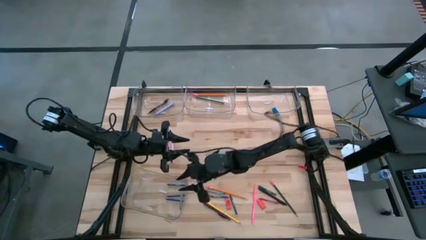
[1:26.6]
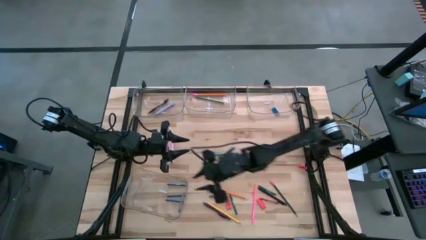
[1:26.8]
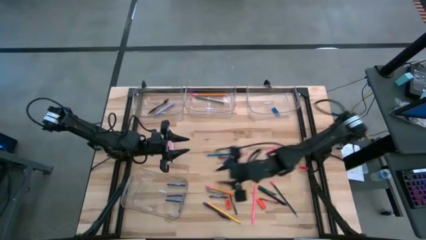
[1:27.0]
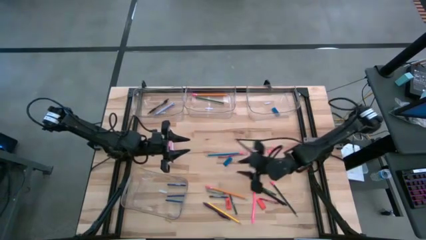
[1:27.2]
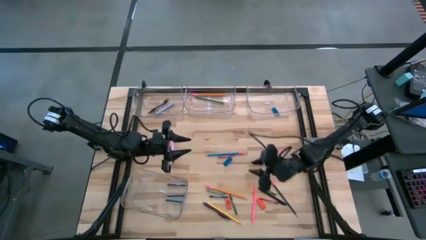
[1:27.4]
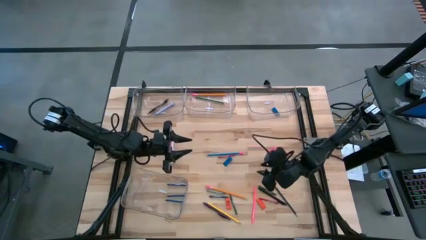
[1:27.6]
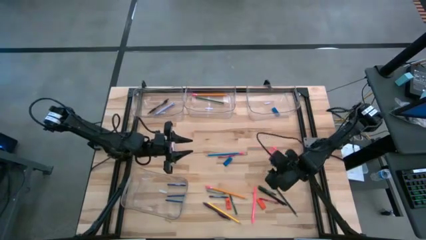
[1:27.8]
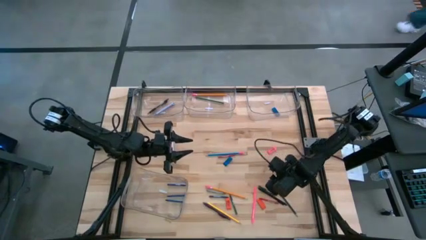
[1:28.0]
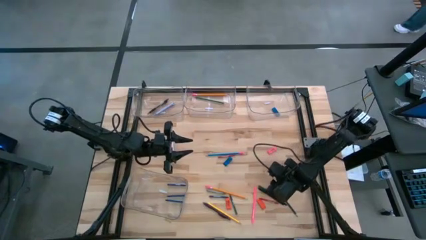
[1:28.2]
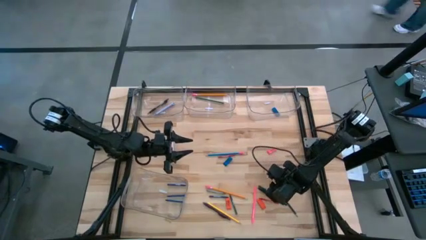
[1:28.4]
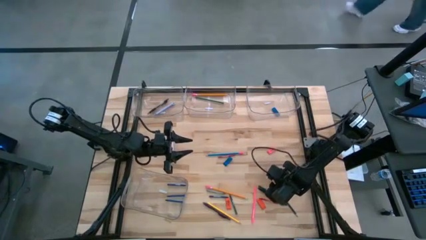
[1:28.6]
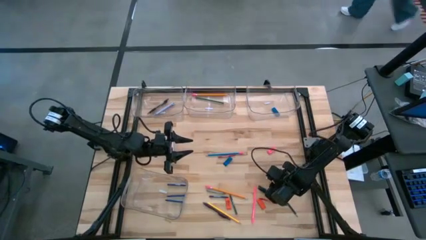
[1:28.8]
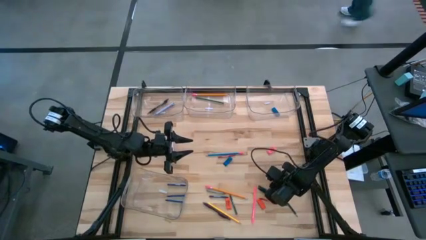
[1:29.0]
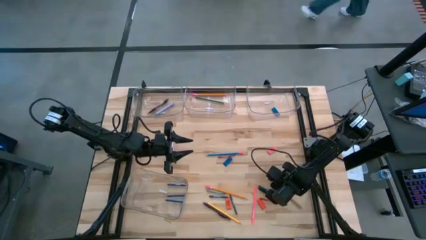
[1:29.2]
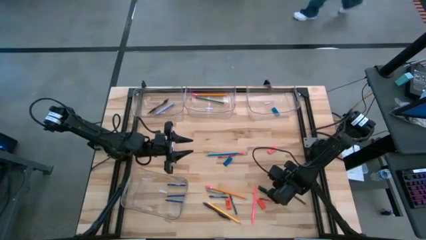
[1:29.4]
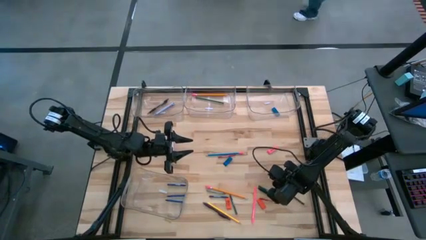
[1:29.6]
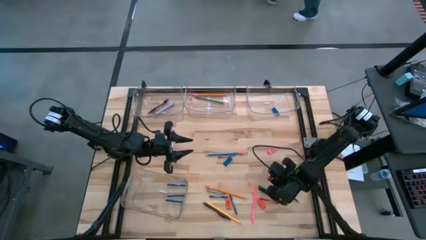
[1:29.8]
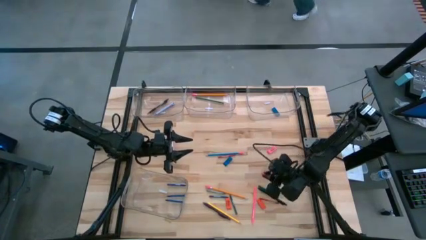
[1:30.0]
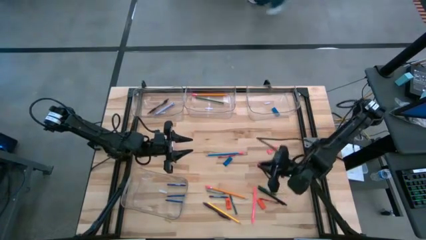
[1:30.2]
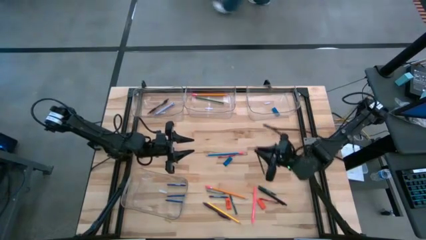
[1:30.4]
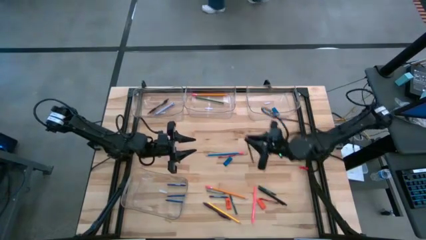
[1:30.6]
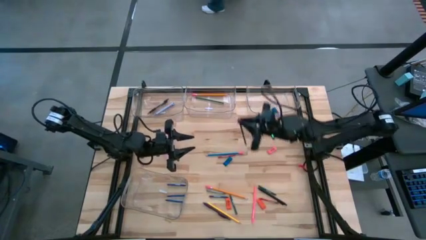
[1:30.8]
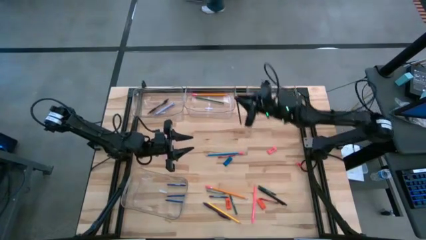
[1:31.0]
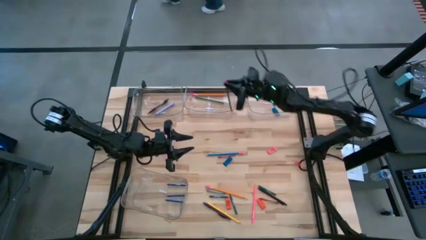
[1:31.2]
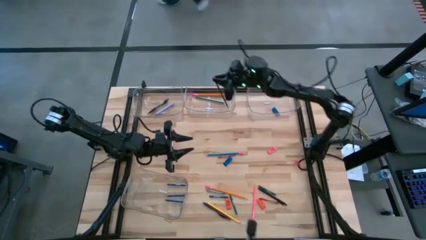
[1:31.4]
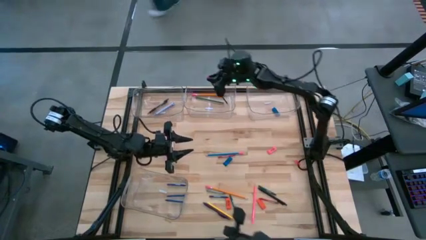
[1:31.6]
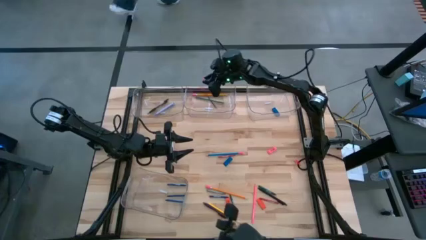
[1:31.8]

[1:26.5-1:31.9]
Task: Sort crayons/erasers/pens/pencils in bins
Put the dark green pencil into the top middle transparent bin

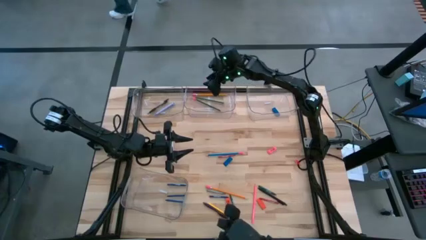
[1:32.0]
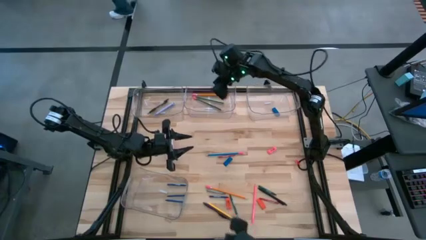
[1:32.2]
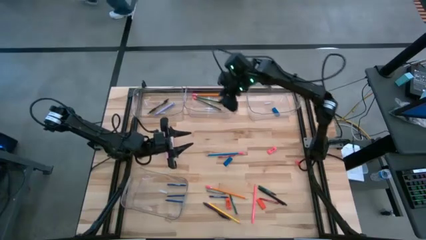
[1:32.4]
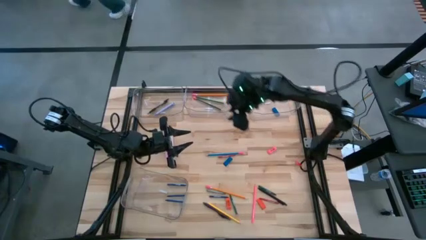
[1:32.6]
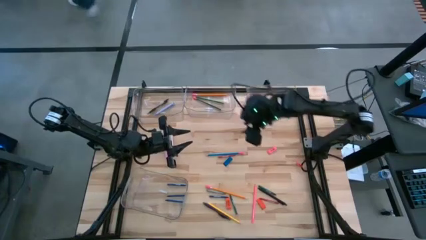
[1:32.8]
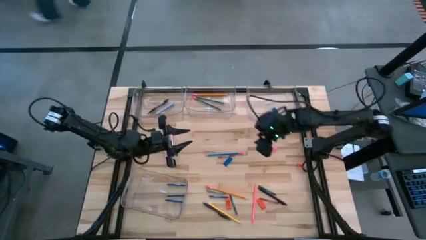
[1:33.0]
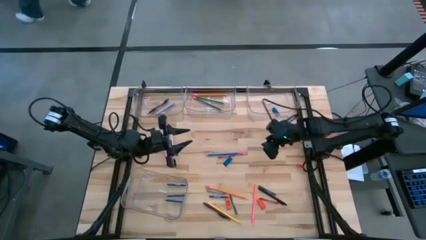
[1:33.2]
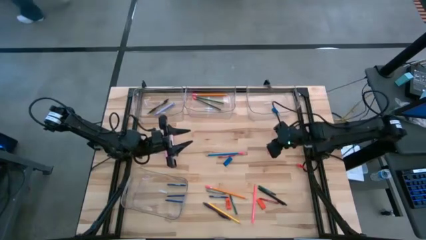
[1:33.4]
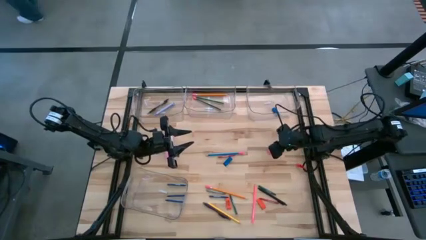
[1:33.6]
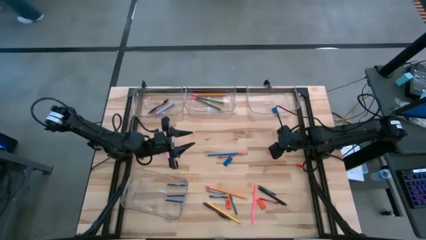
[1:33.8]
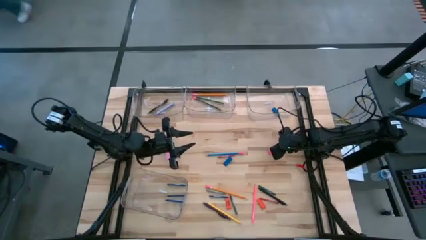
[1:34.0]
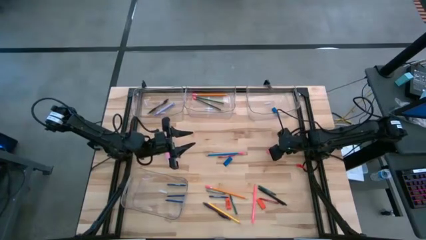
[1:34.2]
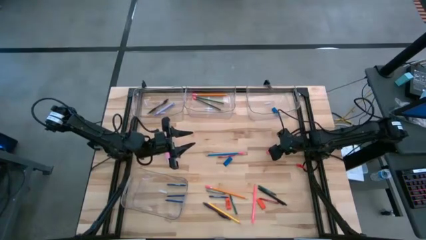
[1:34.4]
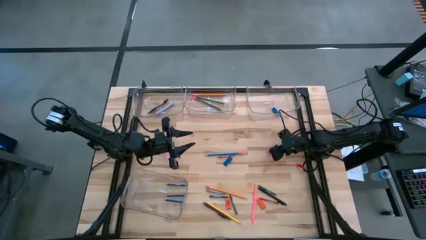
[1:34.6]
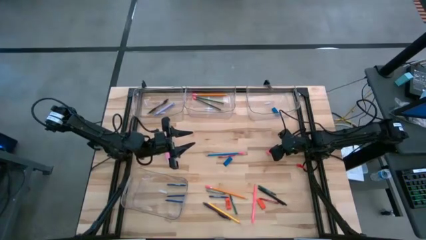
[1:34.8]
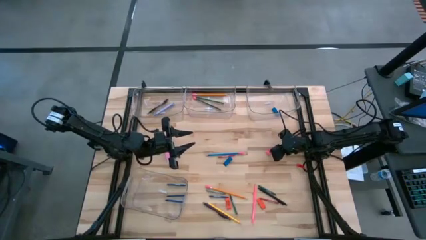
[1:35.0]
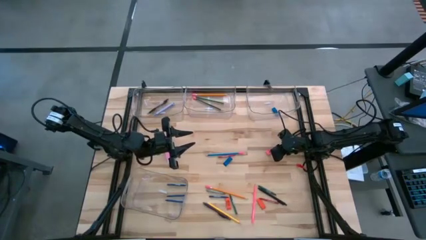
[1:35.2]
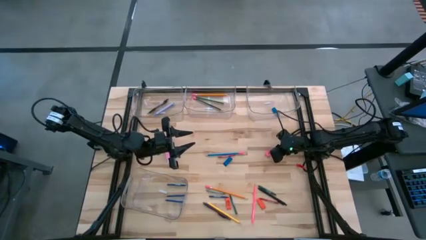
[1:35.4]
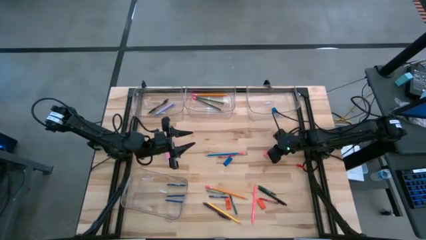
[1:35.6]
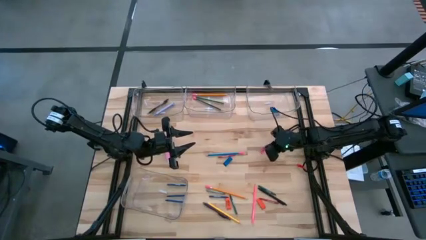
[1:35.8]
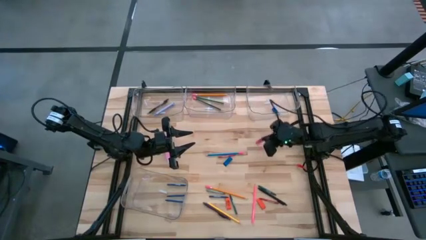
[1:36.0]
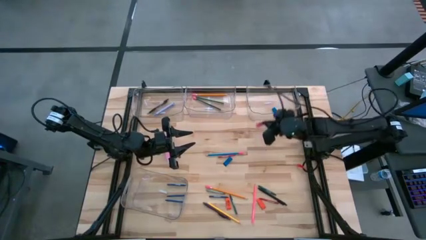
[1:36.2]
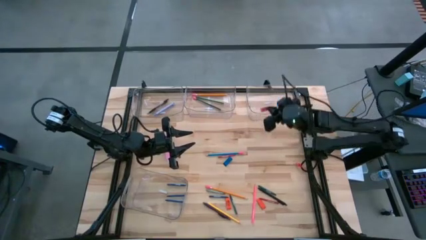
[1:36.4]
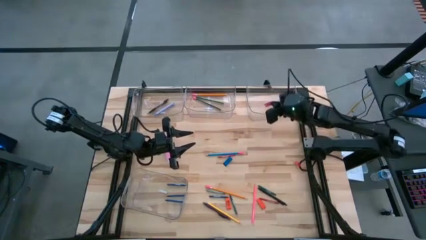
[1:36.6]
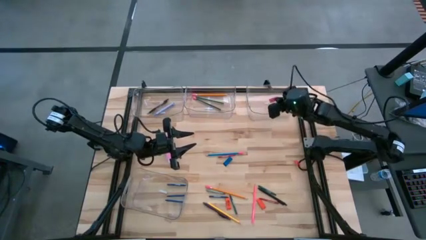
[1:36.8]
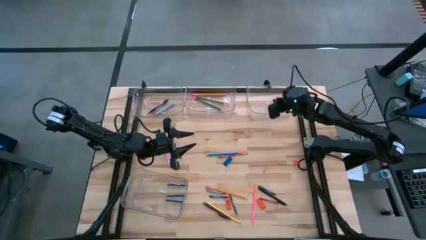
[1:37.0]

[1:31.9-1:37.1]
Put the pink eraser into the top right transparent bin

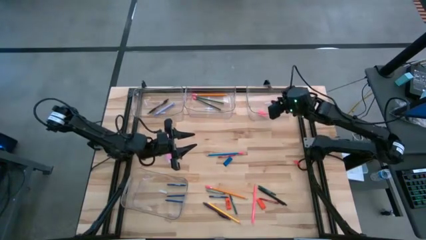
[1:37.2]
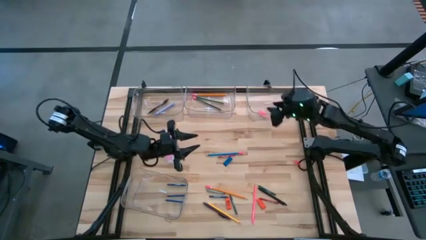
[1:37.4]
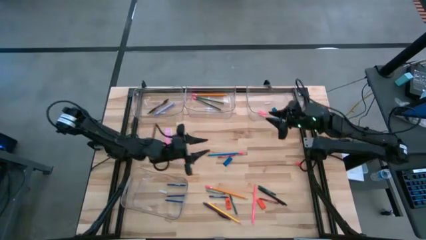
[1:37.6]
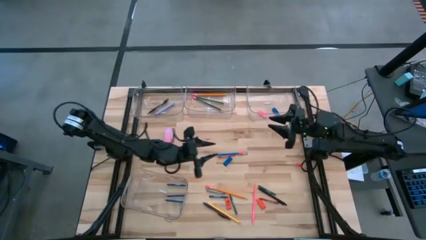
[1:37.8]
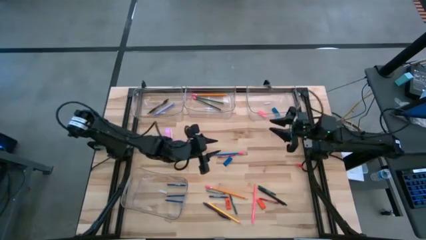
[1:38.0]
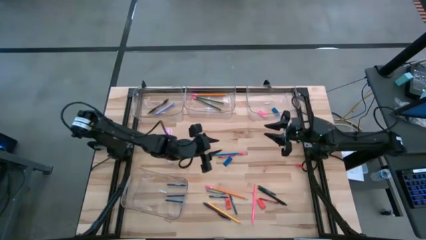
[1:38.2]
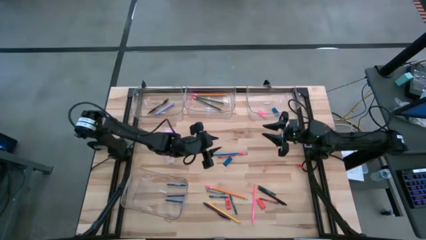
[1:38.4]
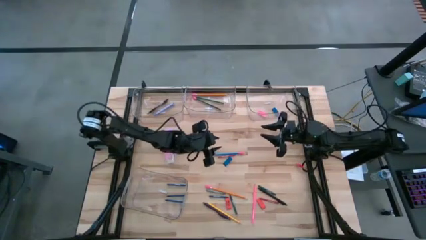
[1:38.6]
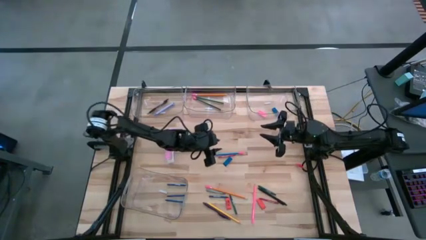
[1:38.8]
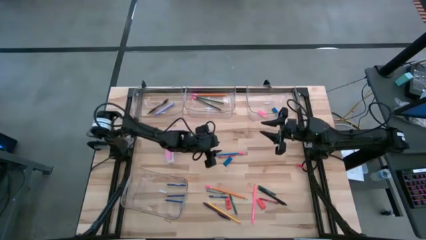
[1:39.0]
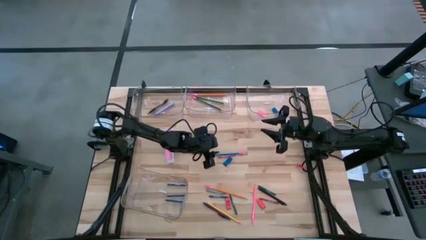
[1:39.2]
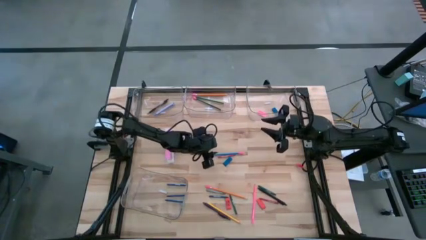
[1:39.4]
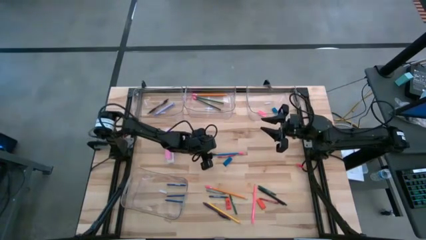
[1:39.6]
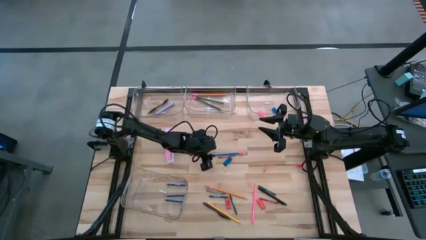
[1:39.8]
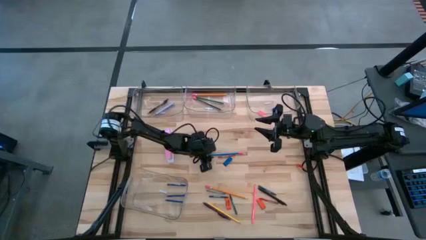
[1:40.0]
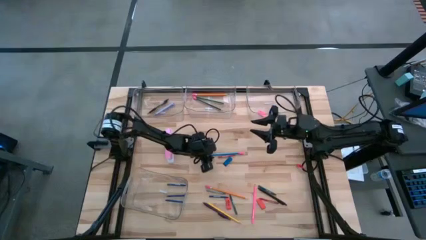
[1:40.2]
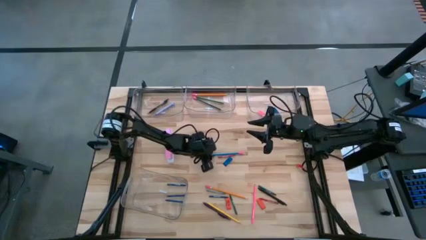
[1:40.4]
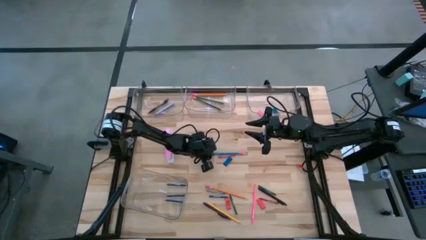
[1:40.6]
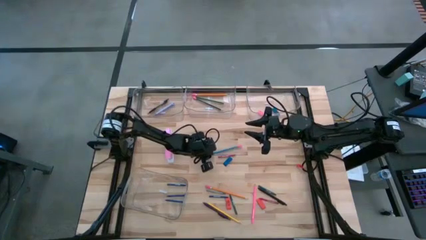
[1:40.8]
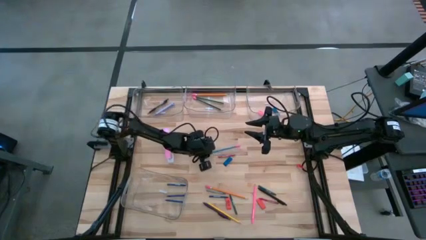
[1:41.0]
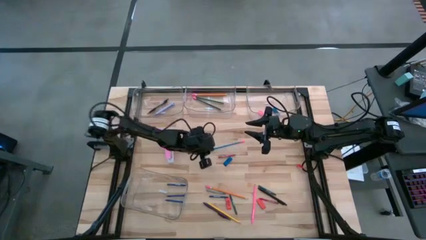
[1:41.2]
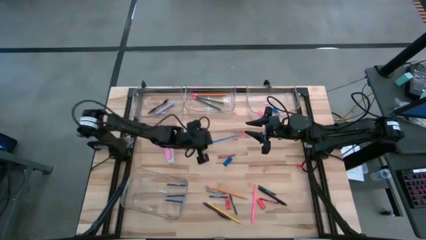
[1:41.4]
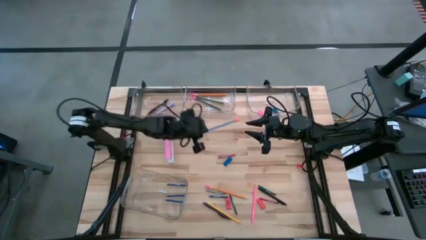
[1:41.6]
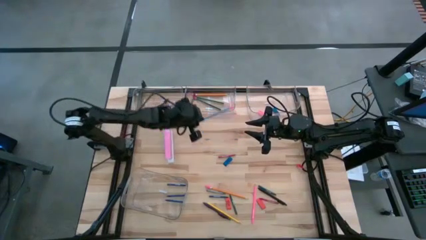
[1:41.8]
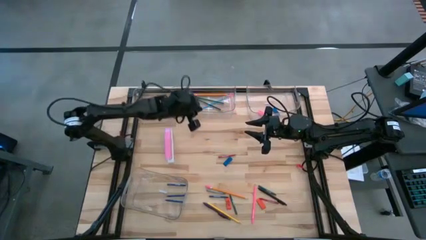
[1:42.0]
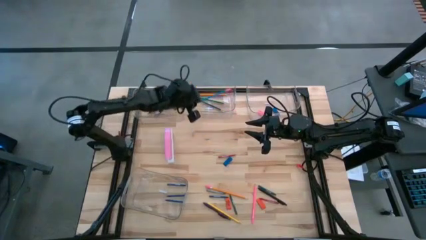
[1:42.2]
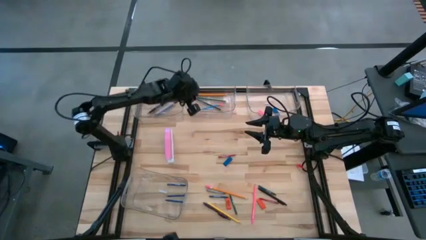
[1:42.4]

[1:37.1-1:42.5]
Put the blue pencil into the top middle transparent bin
